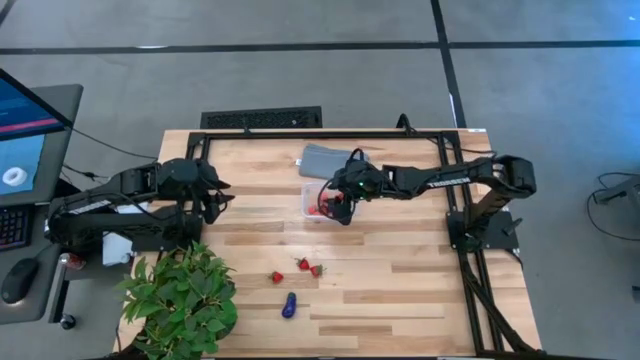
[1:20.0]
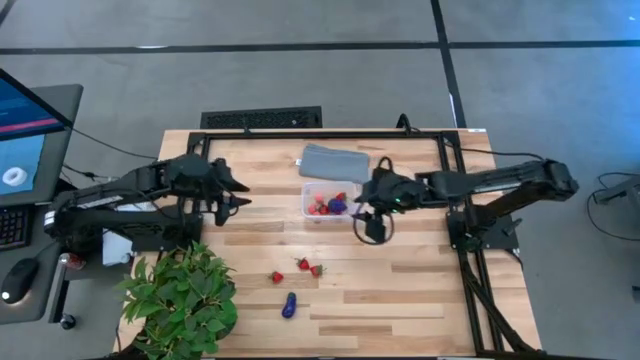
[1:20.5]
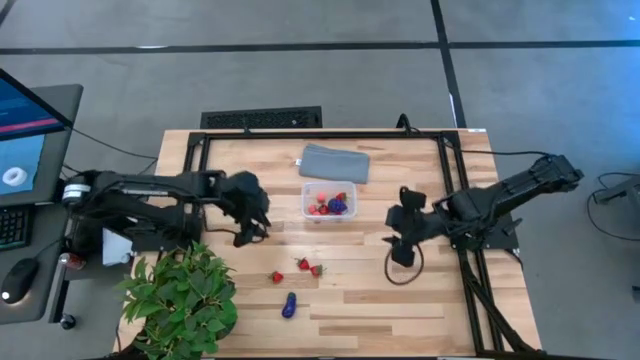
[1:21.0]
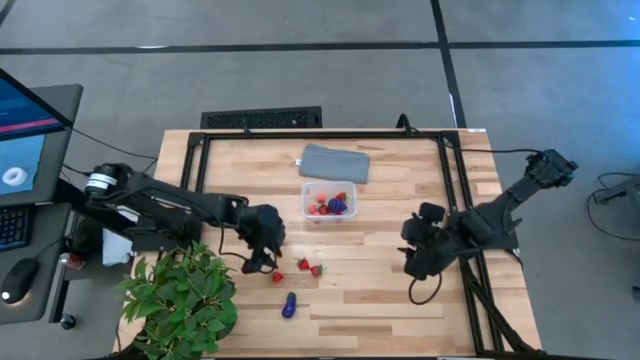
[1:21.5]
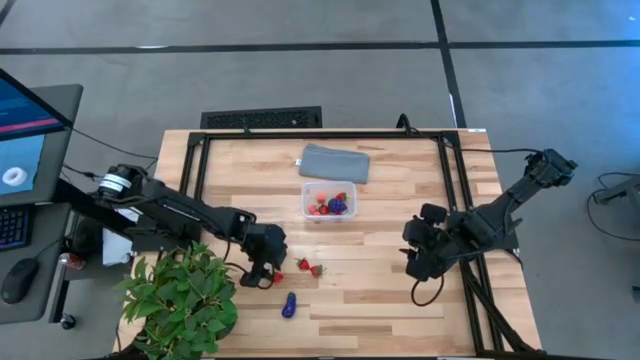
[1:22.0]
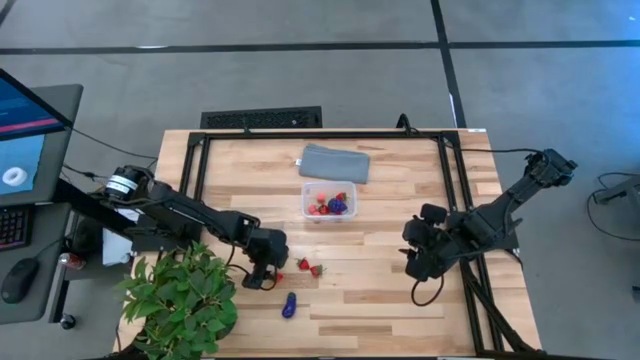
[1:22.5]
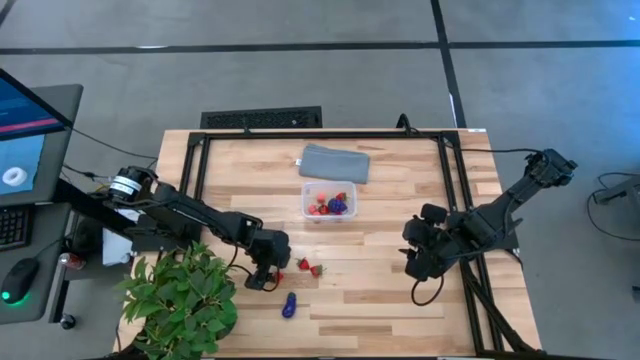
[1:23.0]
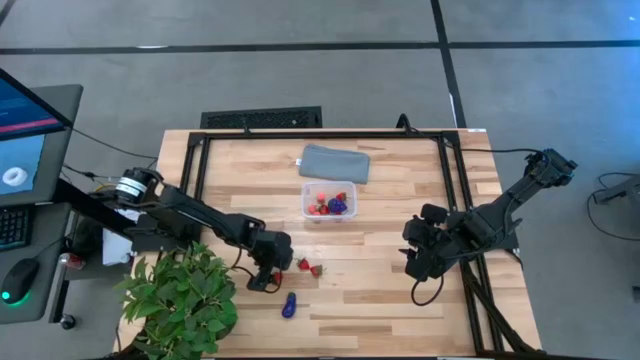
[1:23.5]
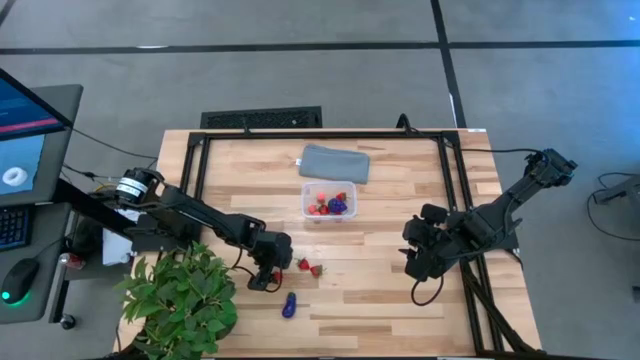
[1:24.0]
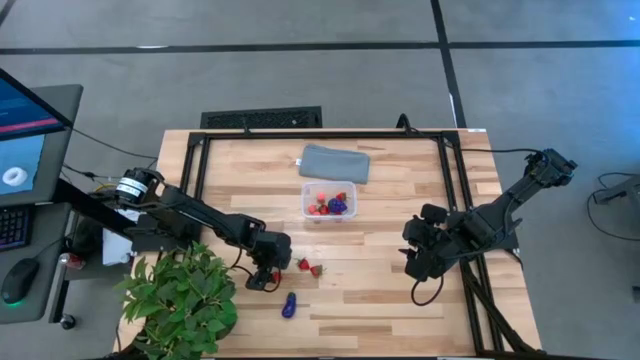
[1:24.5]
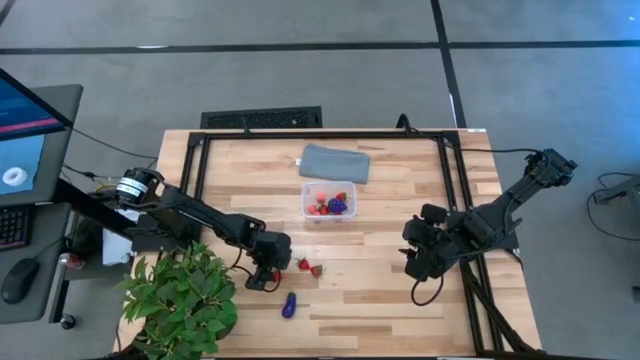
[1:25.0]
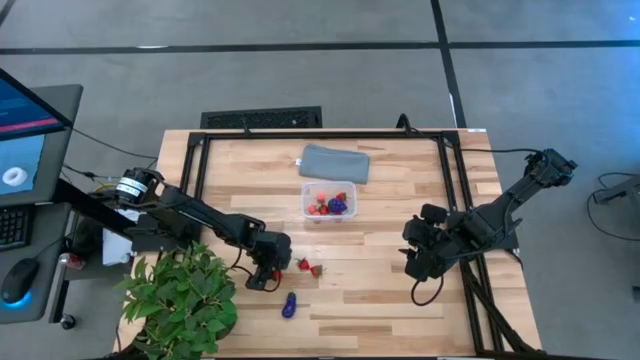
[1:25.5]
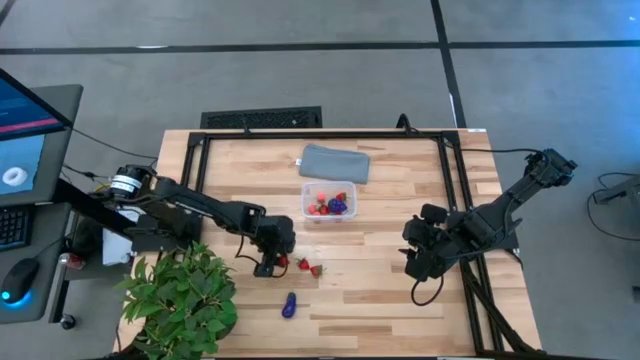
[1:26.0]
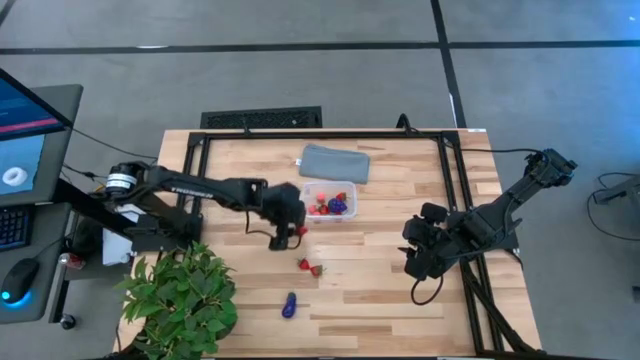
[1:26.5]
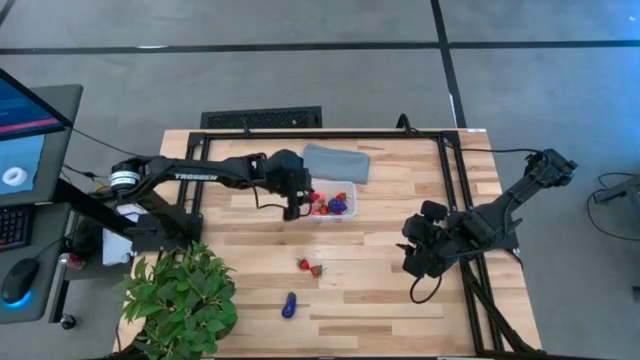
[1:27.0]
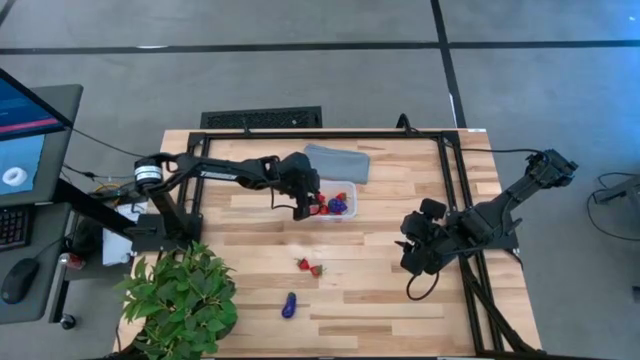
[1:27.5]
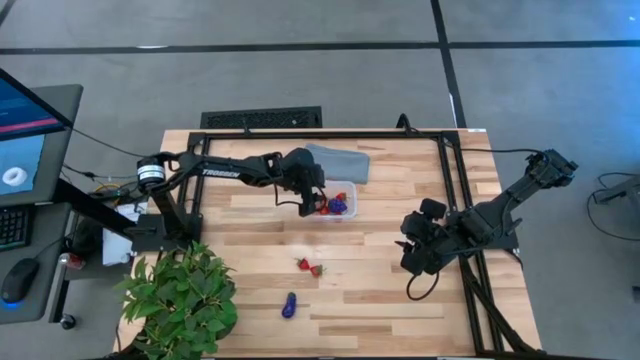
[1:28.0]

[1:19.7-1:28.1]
Task: Pick and placing Produce into tupperware
Put the red strawberry into the transparent bin

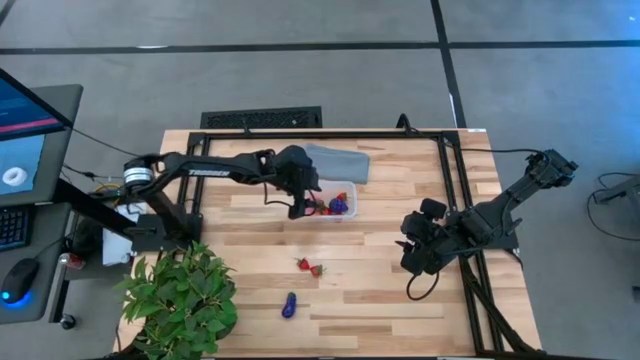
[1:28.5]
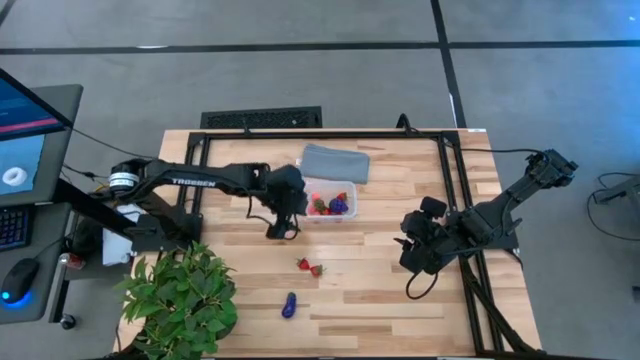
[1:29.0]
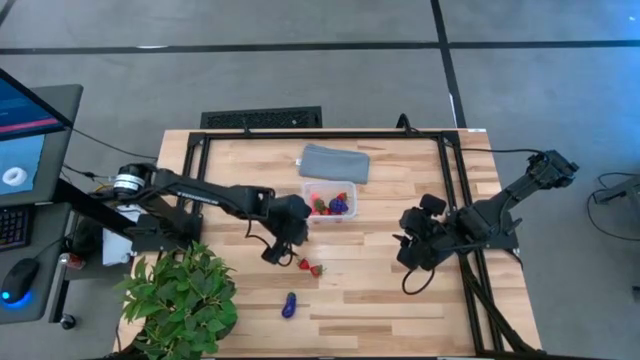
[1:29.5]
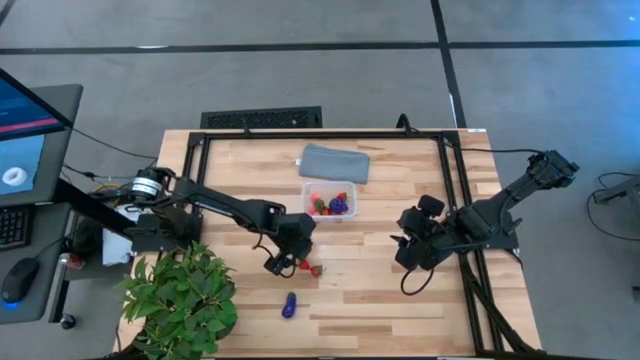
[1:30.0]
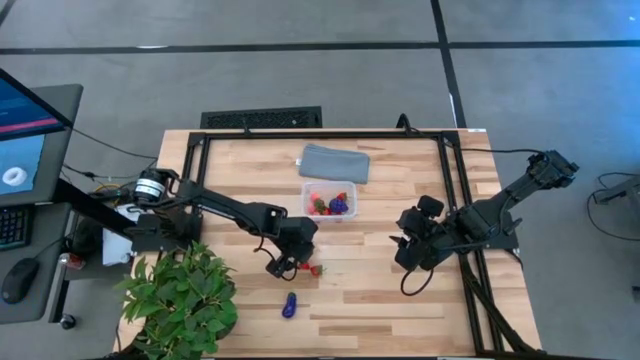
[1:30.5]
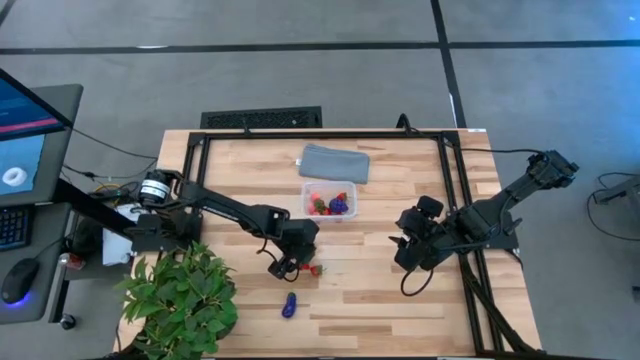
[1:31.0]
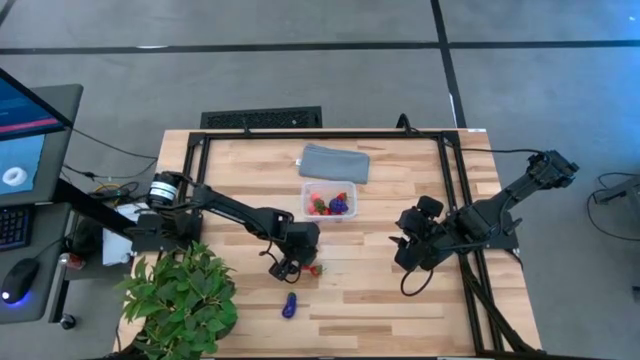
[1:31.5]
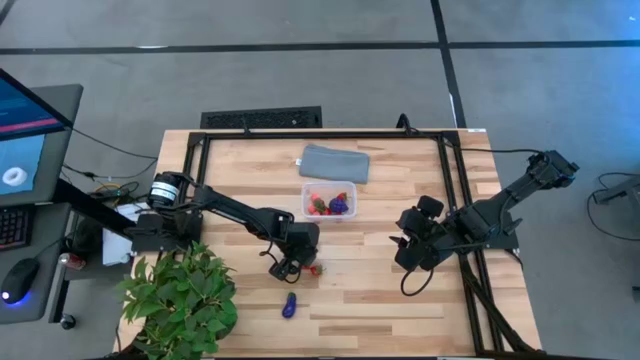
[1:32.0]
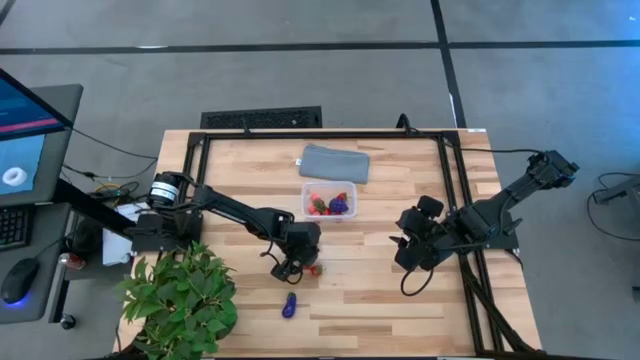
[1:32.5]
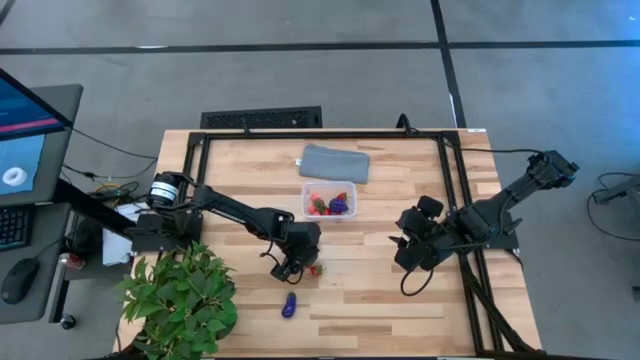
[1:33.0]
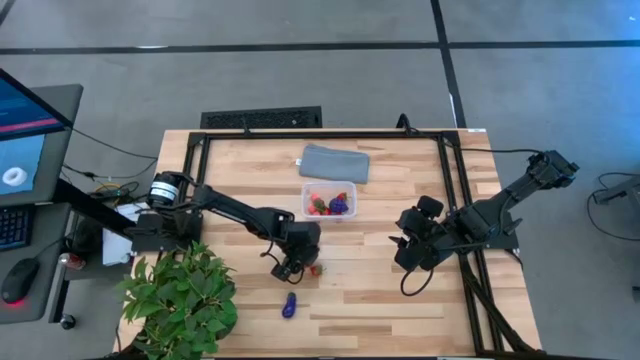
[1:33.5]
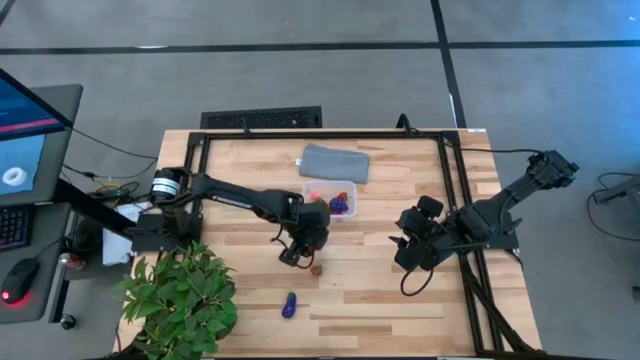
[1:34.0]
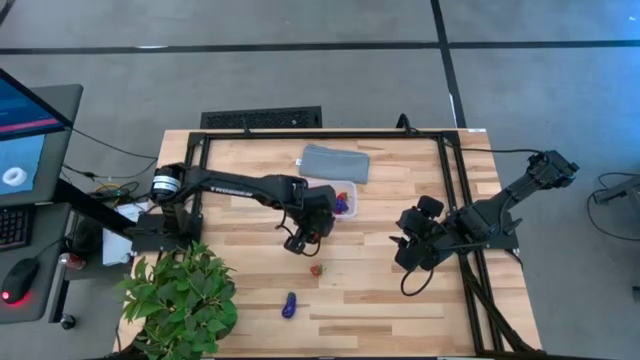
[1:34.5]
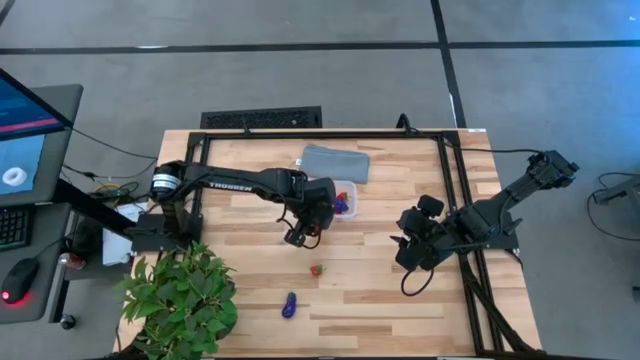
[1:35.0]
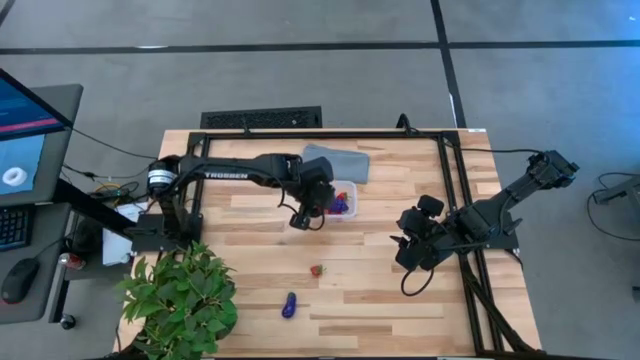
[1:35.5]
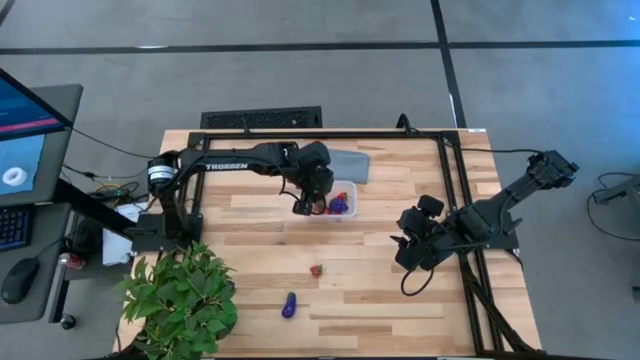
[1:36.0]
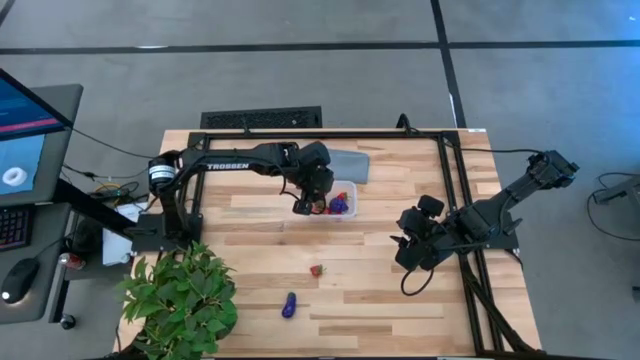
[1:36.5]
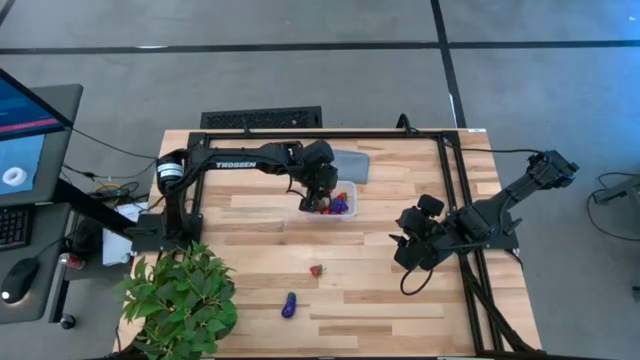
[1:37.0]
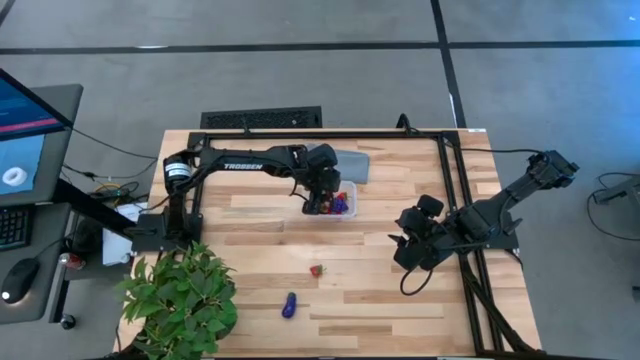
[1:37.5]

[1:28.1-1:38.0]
Put the red strawberry into the transparent bin

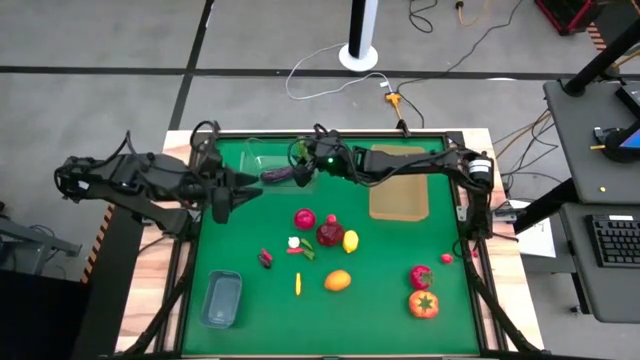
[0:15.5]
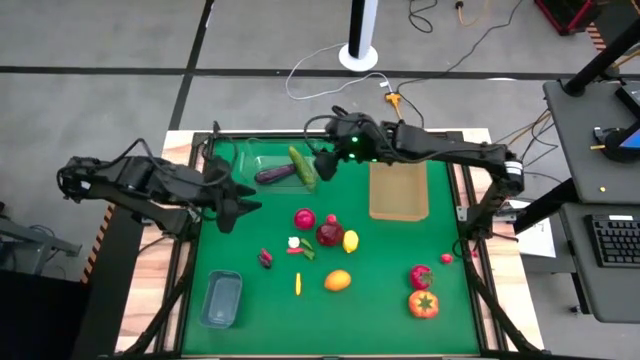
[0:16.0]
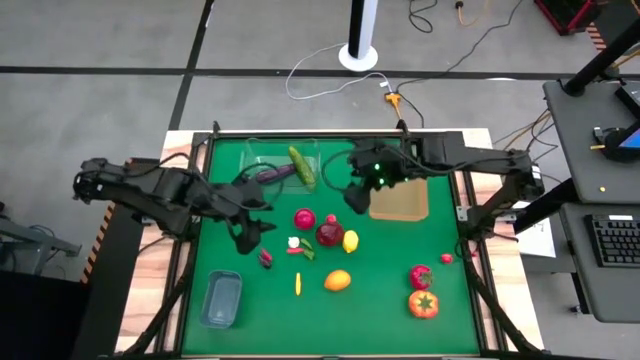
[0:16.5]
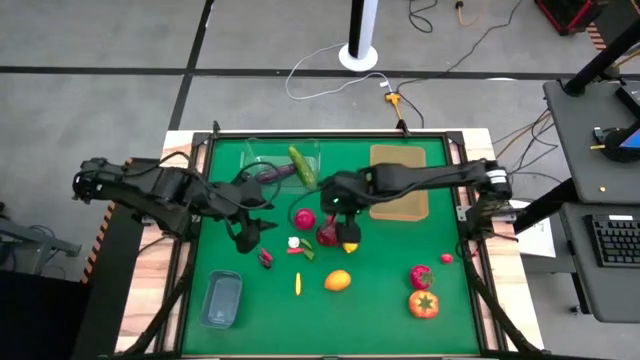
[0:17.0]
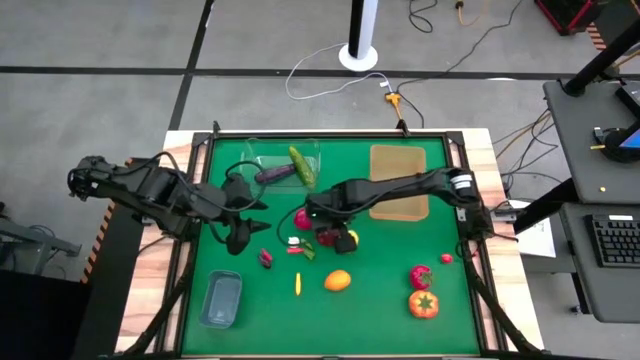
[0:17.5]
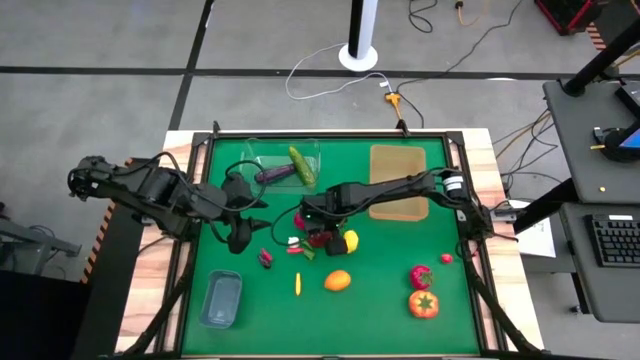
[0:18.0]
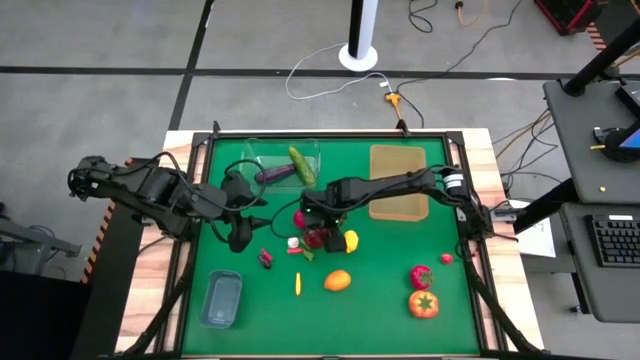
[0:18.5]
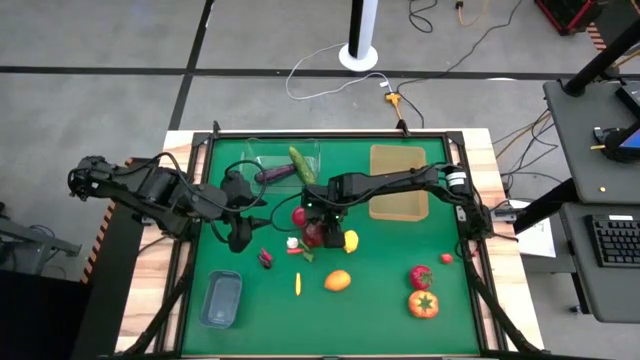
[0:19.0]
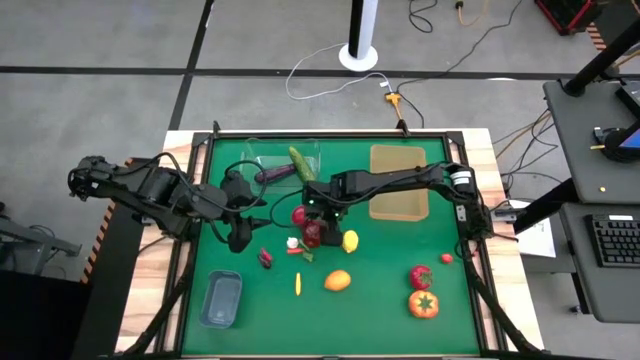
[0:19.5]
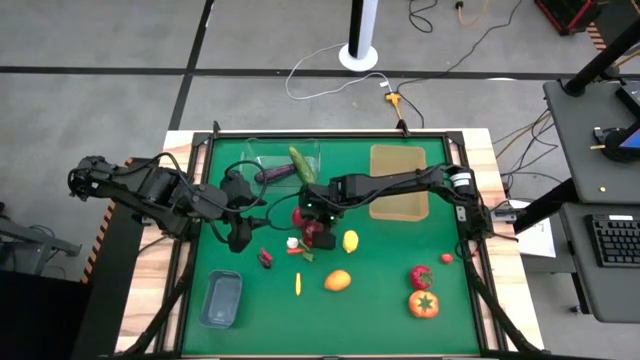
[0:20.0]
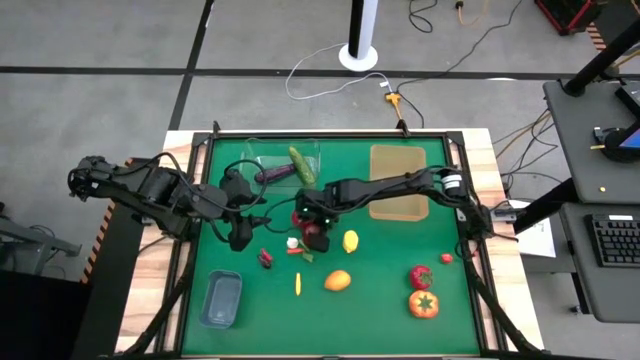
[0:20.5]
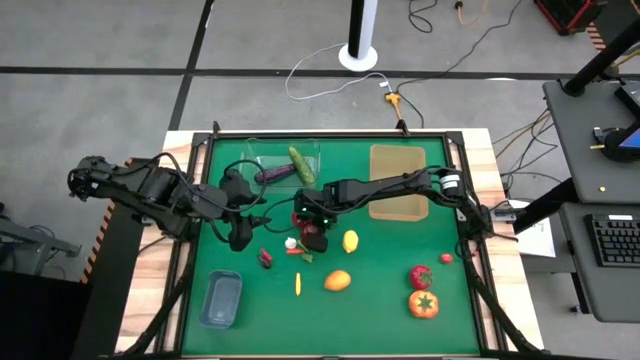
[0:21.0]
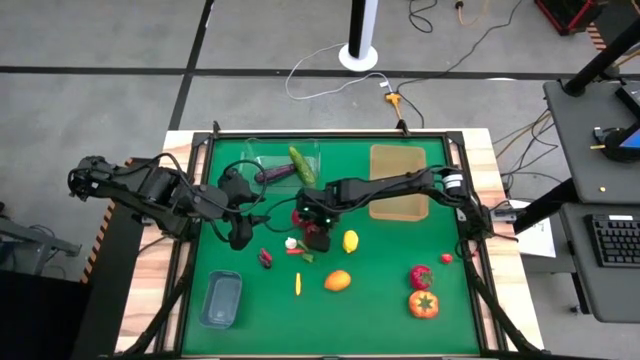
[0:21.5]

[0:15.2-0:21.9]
Task: Sort produce into baskets
Put the red apple into the orange bin
